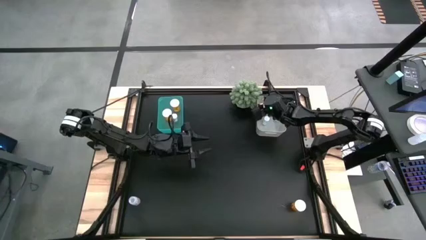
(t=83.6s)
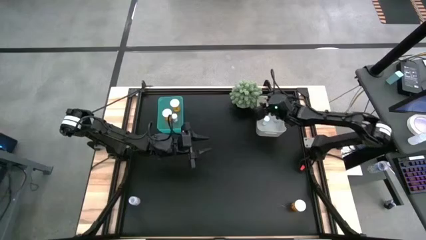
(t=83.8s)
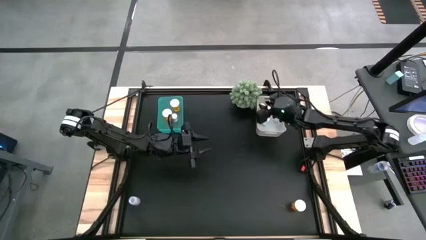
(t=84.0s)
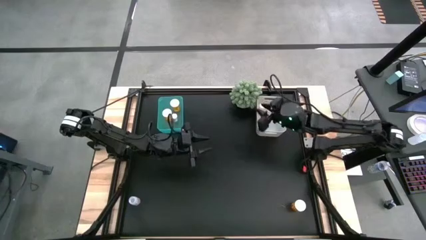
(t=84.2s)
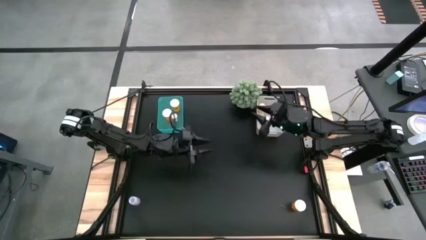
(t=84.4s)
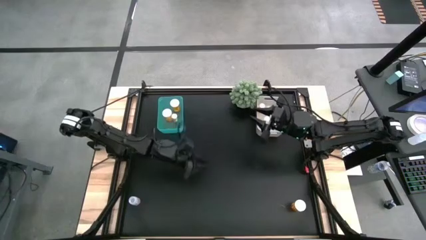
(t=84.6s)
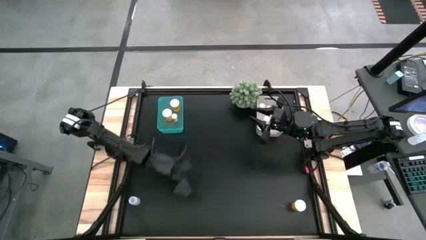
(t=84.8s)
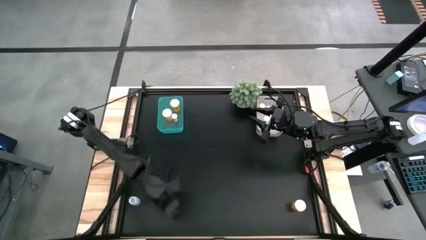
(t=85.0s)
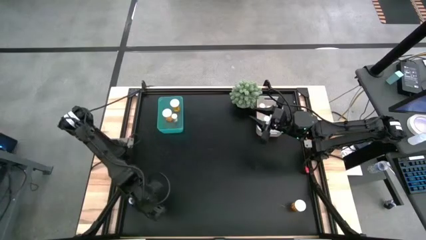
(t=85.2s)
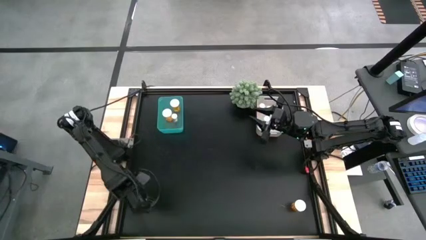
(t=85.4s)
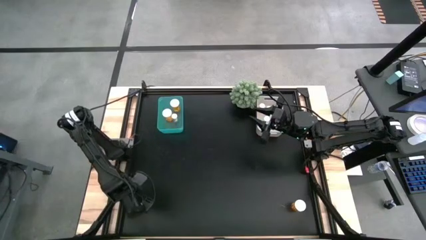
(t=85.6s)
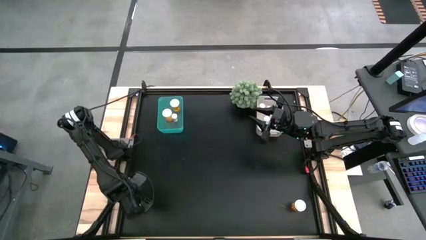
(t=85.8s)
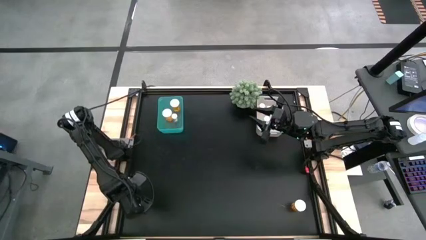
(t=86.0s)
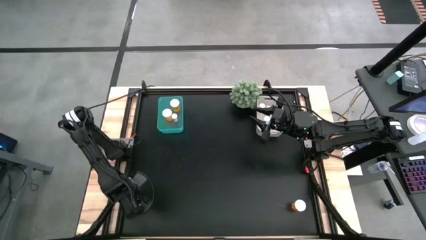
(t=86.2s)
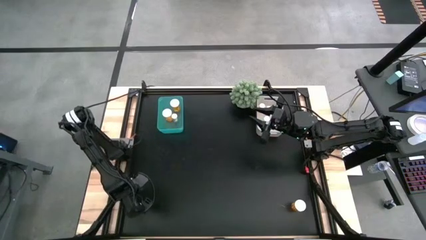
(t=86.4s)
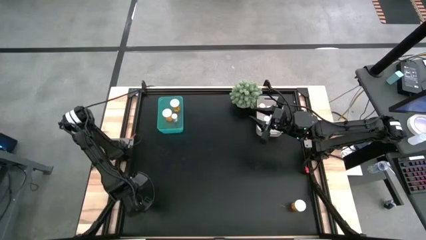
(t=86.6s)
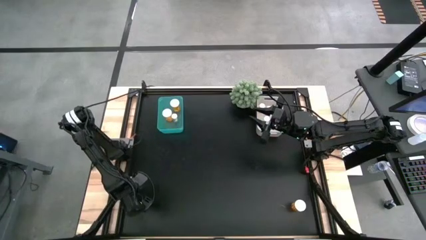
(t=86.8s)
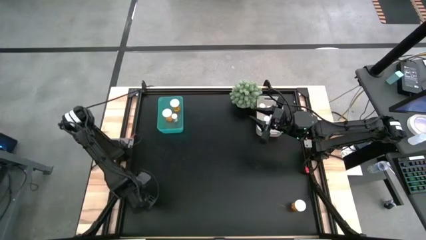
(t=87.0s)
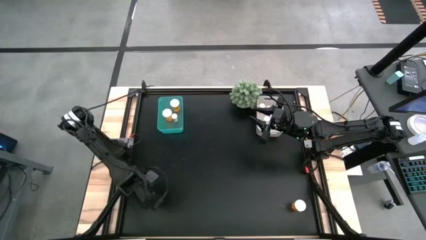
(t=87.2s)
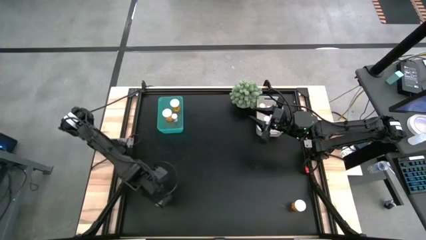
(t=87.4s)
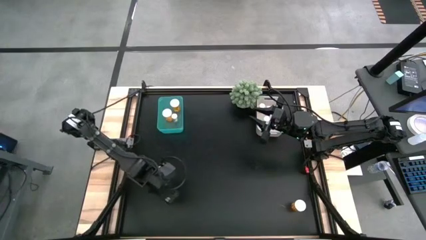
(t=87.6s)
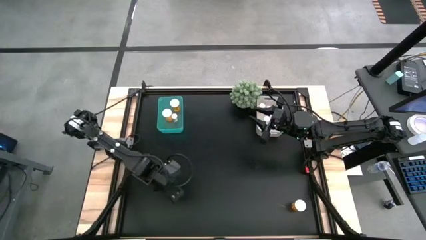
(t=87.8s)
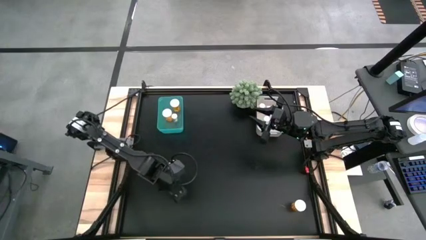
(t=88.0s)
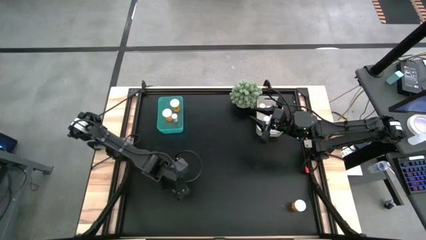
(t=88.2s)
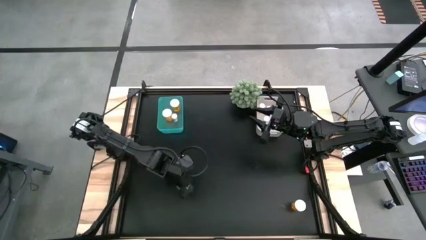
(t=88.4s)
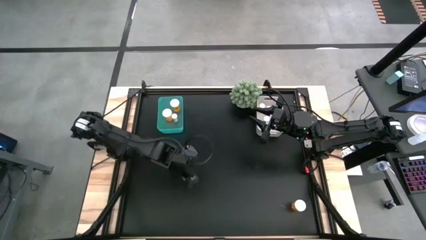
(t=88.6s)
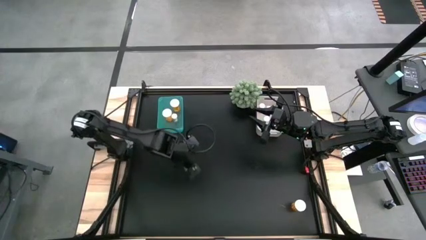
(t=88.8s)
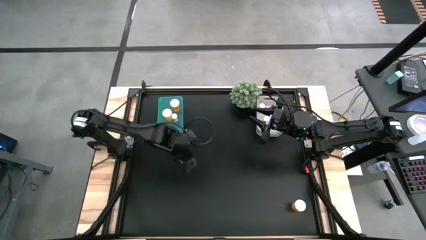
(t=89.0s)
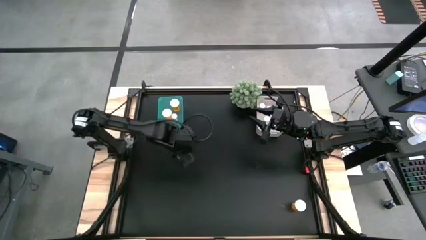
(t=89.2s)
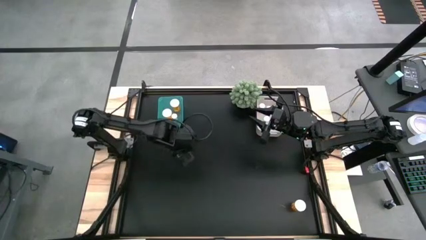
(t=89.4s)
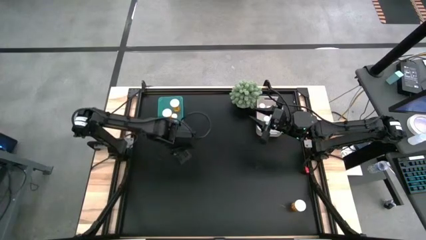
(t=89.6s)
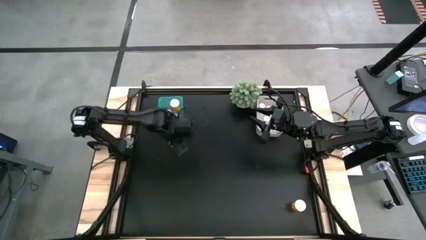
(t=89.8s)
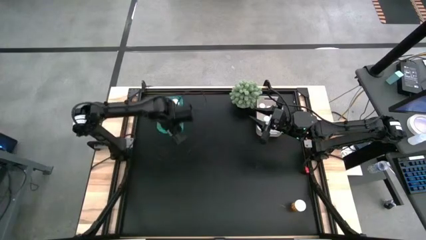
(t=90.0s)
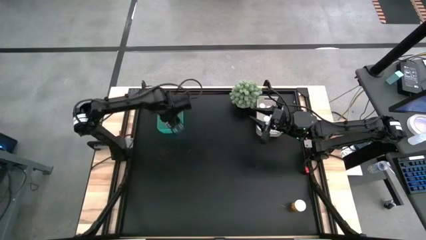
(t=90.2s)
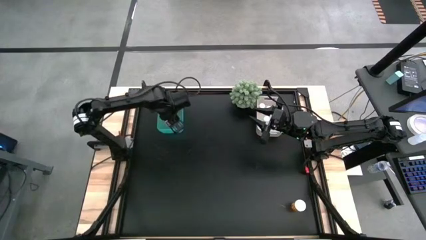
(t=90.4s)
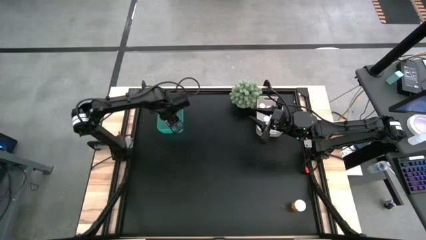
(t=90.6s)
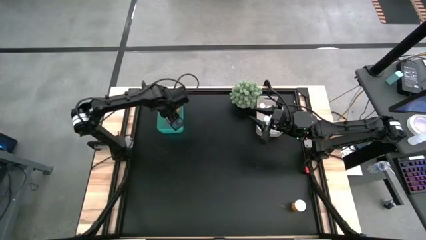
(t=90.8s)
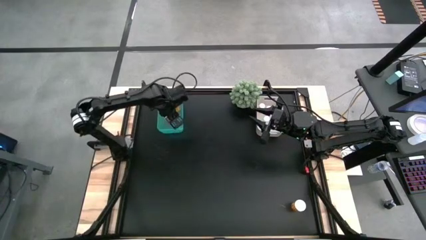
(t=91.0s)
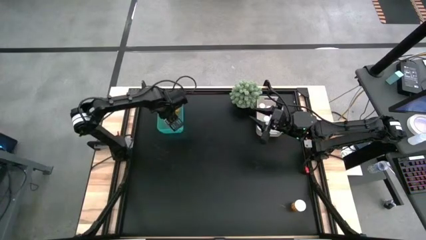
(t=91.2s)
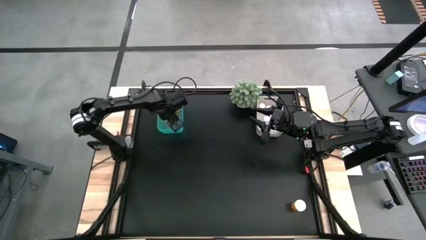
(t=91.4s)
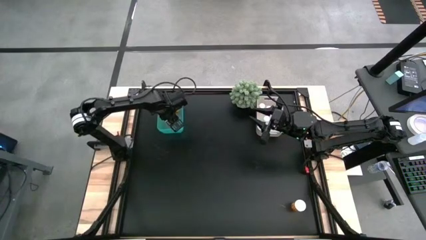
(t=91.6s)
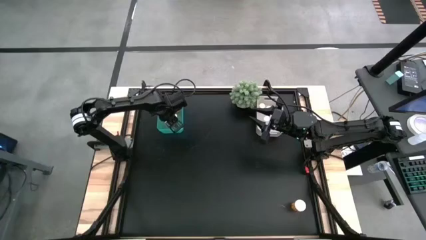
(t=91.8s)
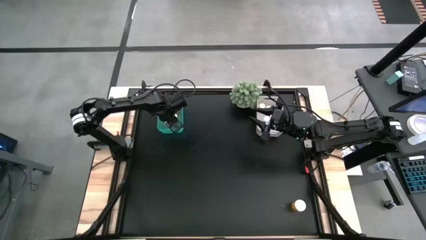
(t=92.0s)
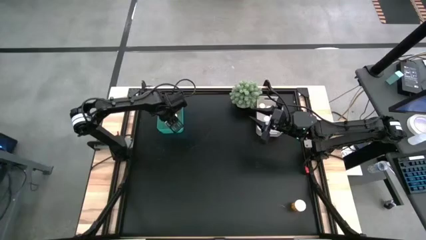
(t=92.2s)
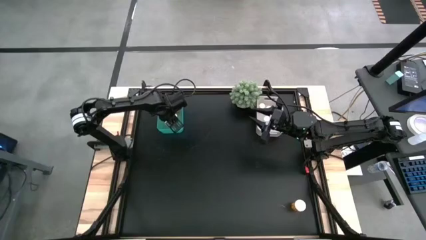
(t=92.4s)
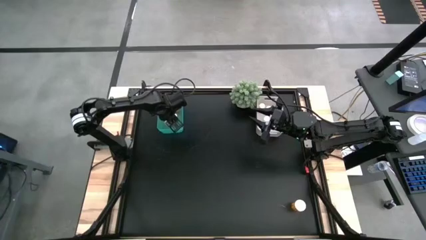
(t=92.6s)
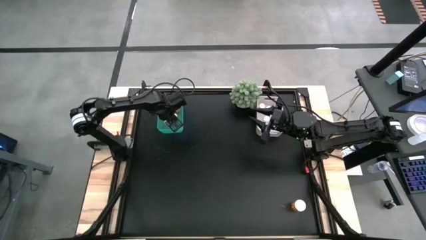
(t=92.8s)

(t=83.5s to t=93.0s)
Task: Pick and place medicine bottles into bin by pill shape (circle, oval)
Put the transparent capsule bottle into the green bin

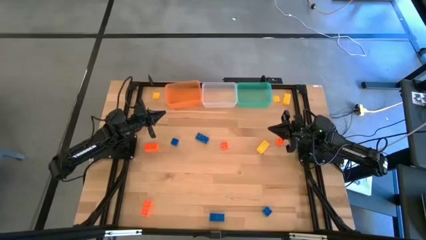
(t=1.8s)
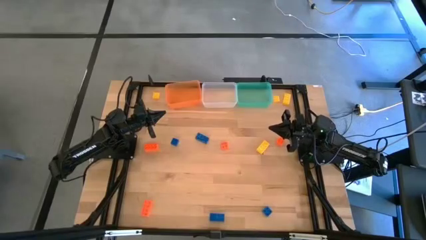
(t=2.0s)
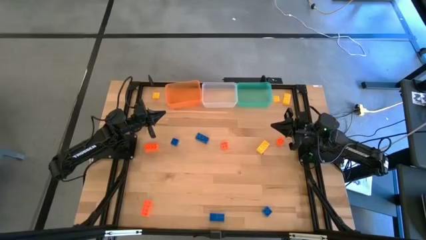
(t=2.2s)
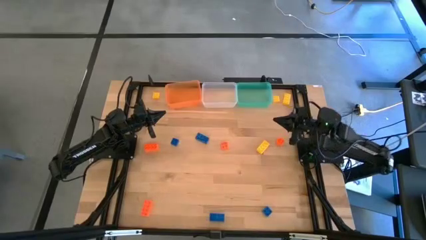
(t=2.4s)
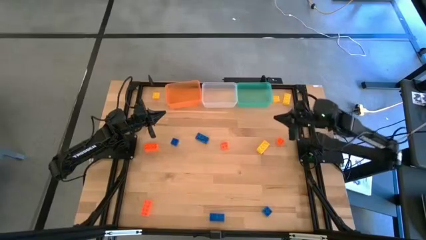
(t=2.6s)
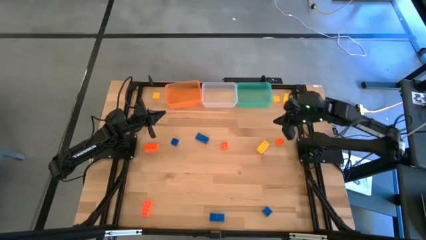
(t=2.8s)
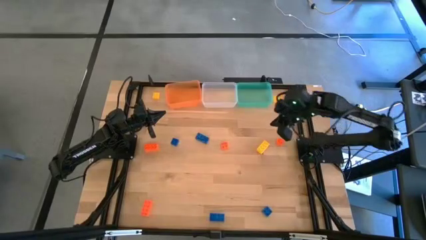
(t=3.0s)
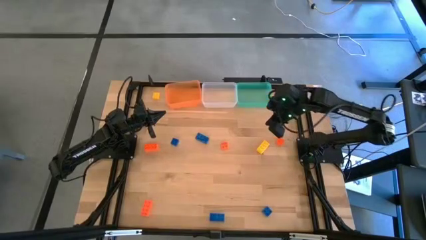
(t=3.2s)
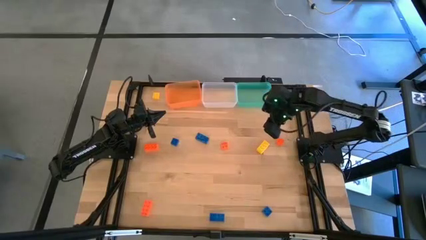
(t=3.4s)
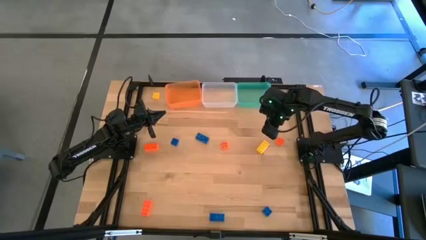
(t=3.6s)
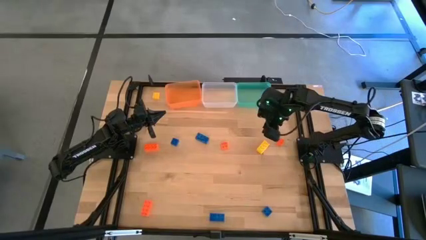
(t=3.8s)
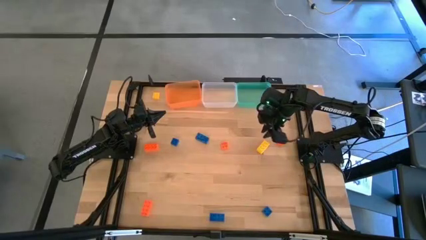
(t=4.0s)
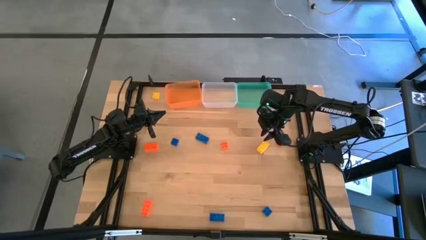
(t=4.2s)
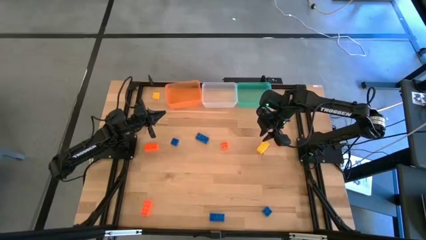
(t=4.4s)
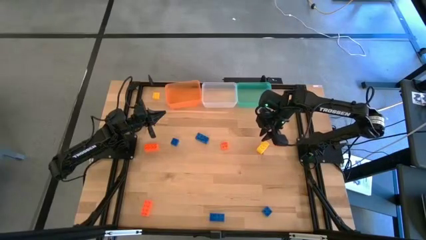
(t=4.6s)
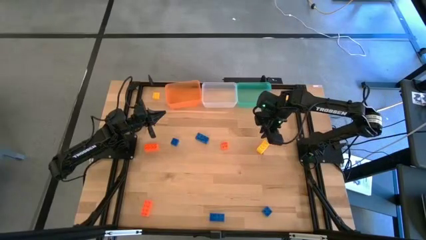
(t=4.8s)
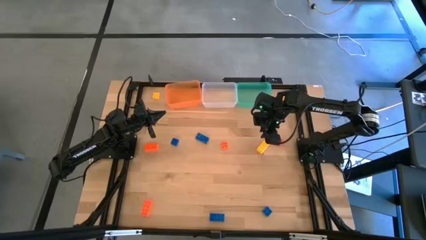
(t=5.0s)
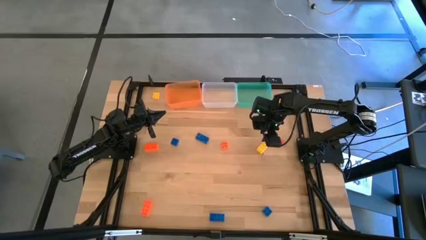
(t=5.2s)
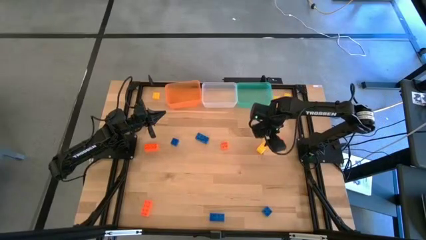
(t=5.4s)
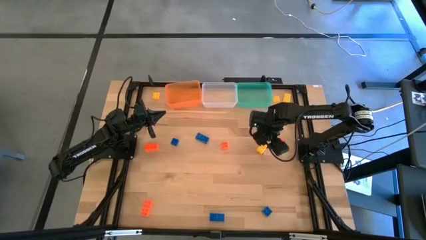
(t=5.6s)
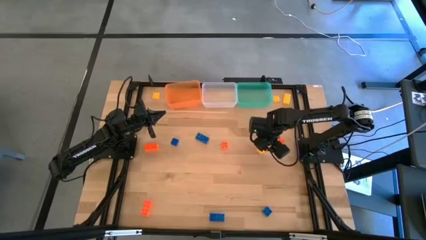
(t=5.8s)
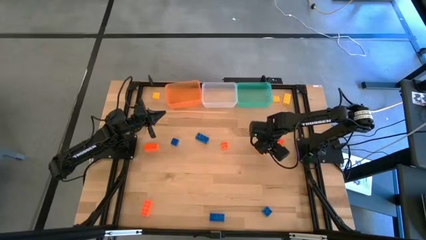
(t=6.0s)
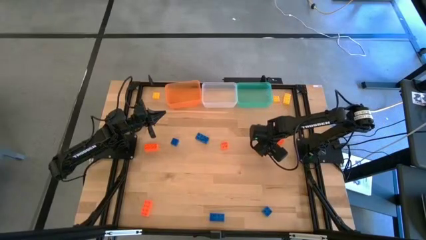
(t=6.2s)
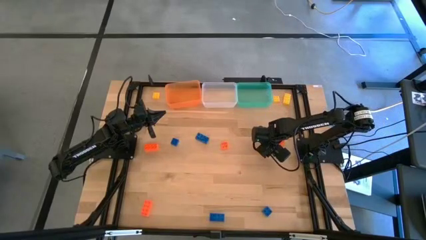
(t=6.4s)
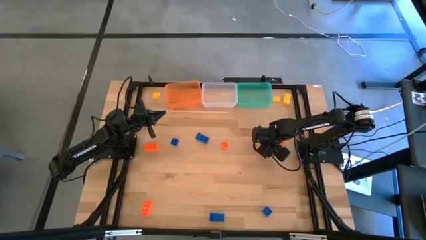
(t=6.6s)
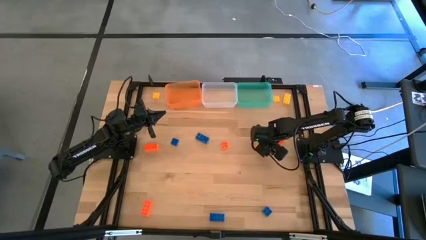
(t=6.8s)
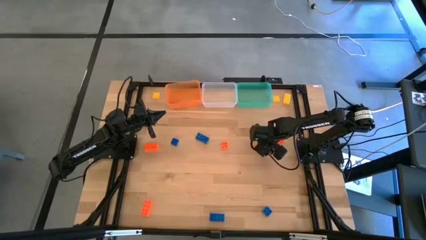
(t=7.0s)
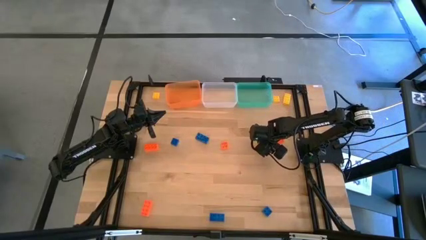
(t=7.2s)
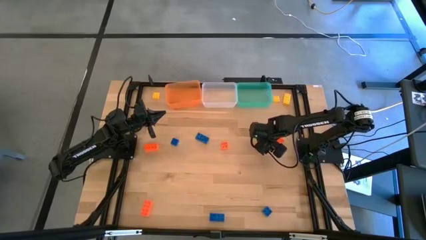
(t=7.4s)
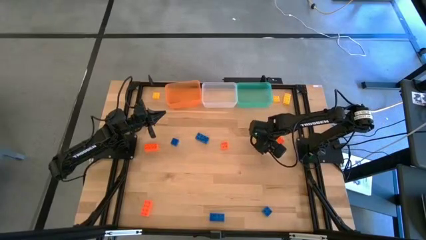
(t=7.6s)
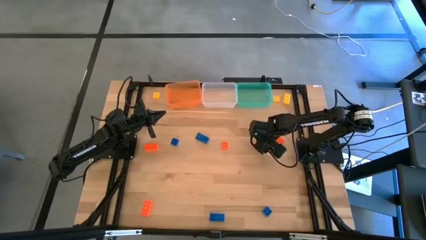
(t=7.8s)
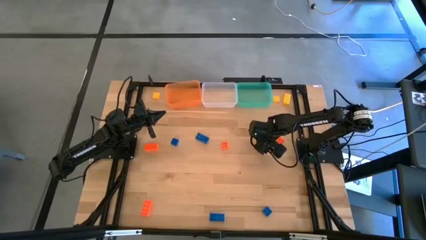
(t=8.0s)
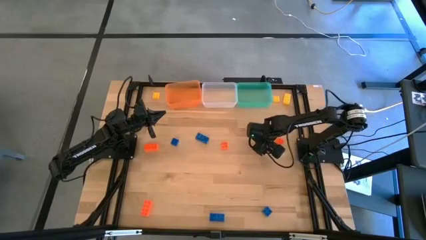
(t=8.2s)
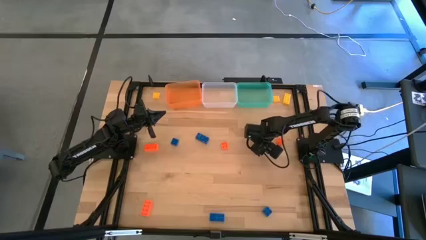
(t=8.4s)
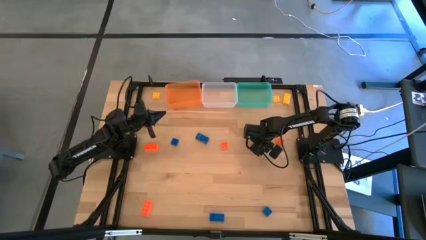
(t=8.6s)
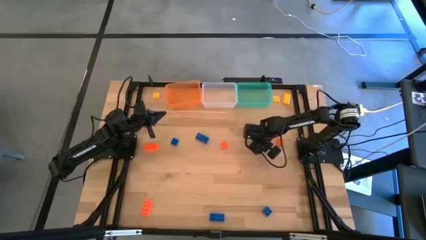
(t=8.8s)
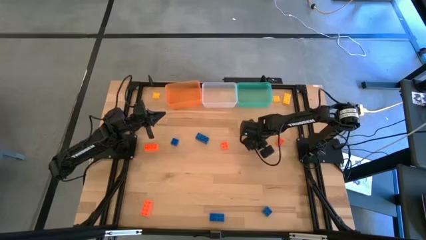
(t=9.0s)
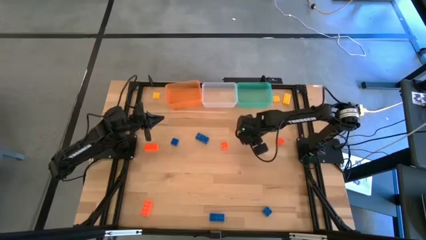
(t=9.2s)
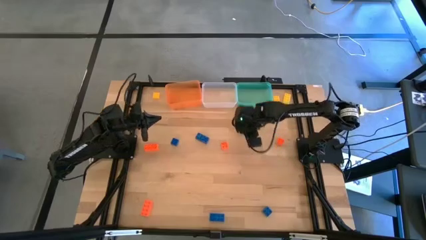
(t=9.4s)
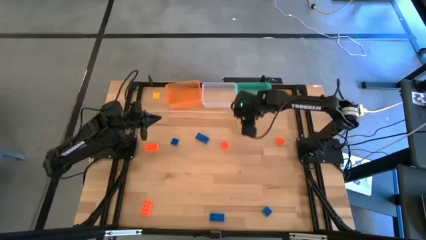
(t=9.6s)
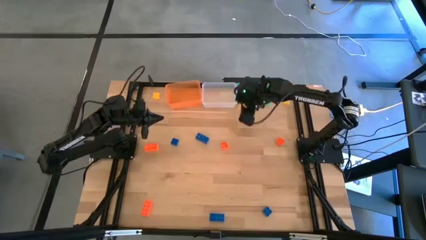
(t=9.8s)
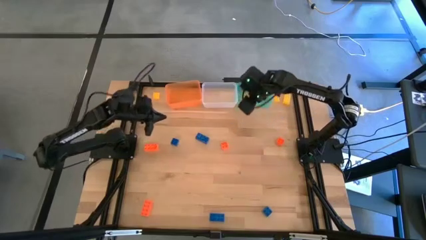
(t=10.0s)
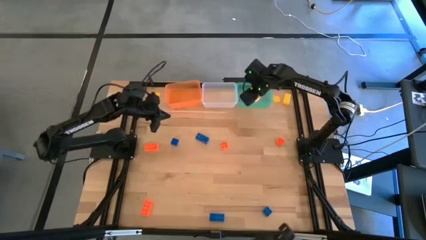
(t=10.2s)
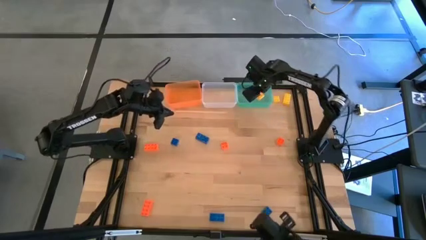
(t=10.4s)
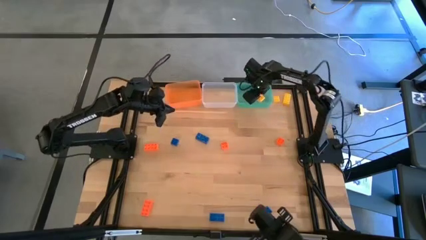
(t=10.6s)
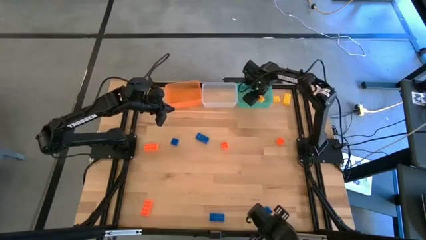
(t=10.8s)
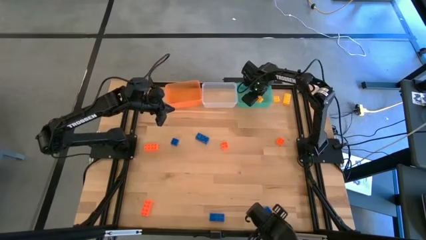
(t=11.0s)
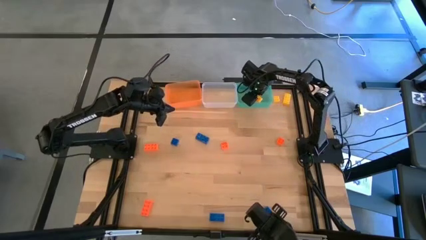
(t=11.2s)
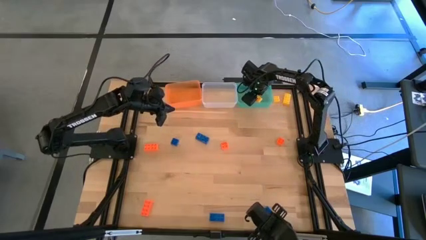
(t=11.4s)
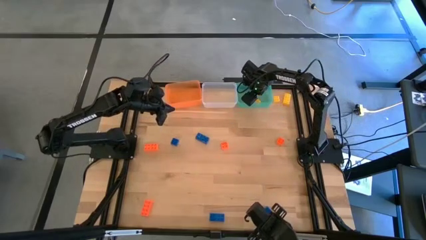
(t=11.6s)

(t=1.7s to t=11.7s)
Task: Sort & place blocks by color
Put the yellow game piece into the green bin
